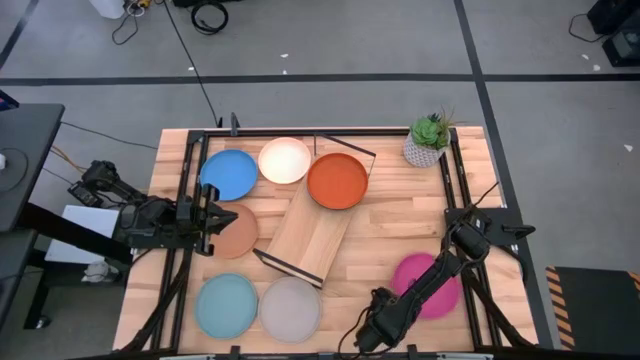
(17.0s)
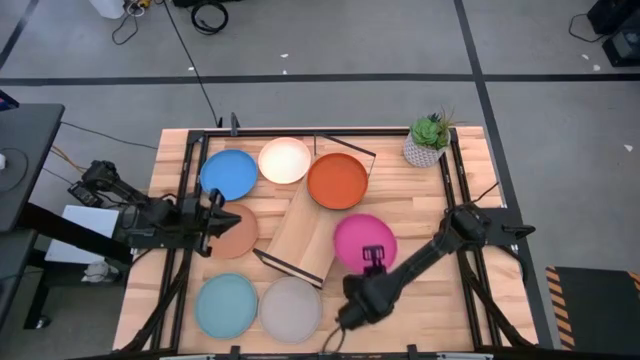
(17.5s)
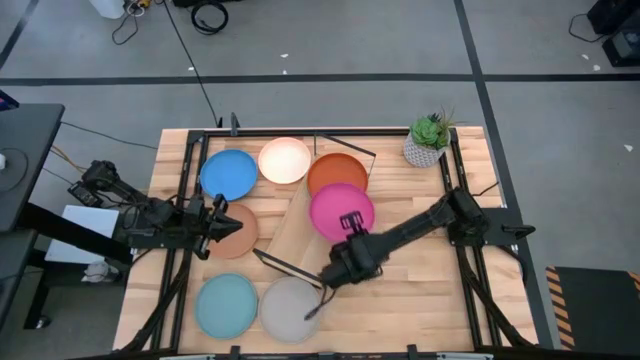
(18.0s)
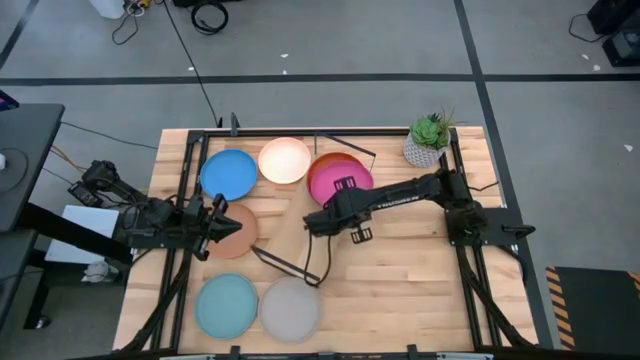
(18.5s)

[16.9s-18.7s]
Task: Place and stack plates onto a shelf
Stack the pink plate on top of the orange plate on the shelf

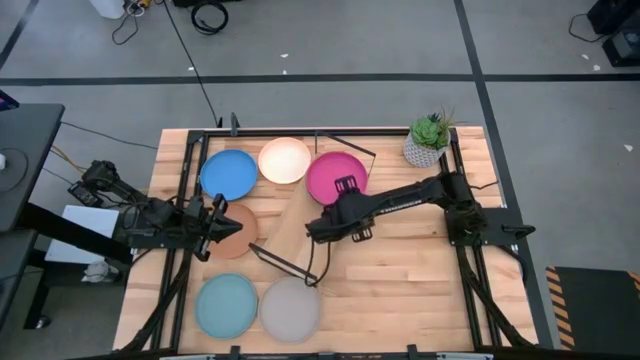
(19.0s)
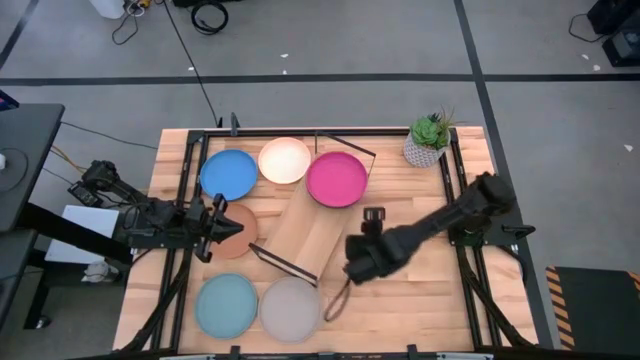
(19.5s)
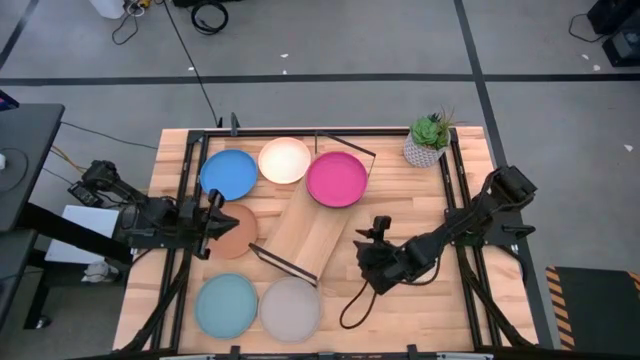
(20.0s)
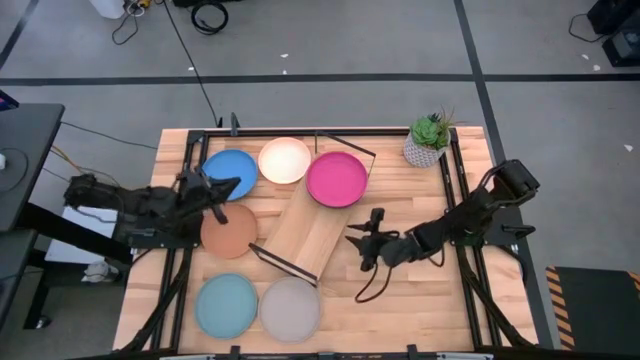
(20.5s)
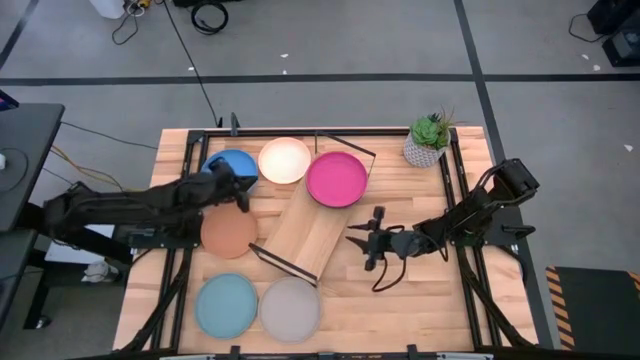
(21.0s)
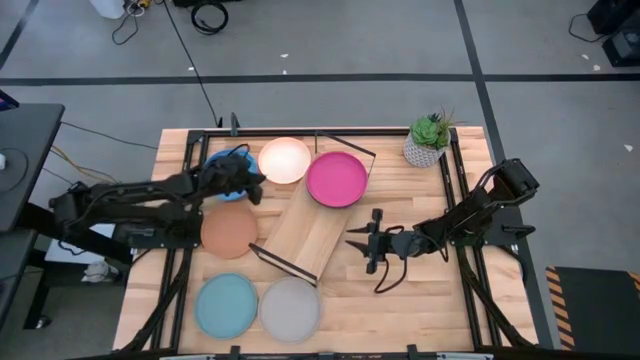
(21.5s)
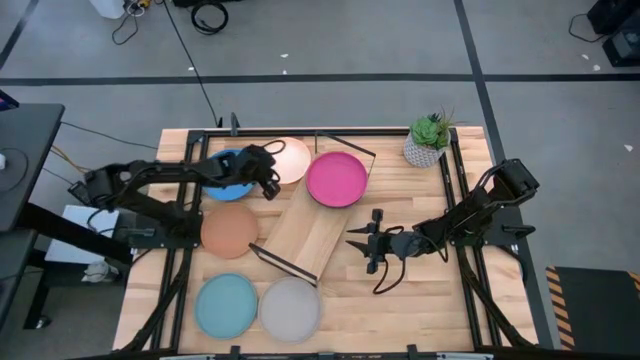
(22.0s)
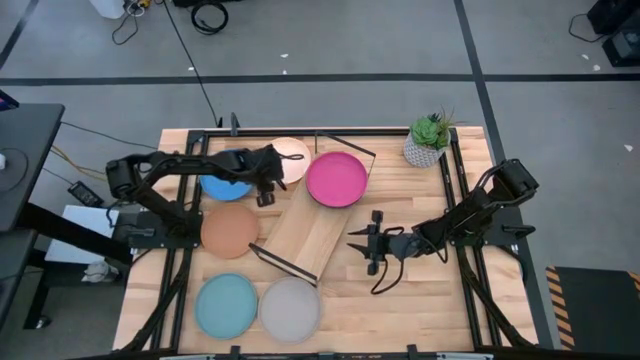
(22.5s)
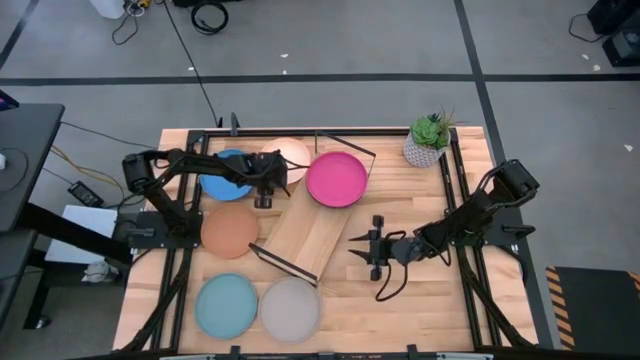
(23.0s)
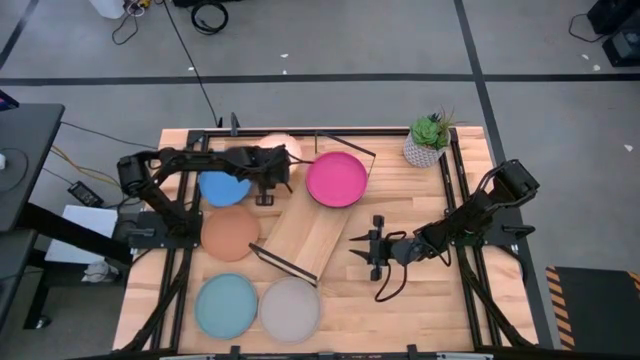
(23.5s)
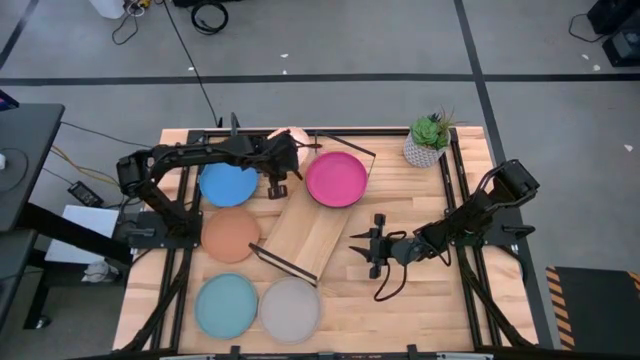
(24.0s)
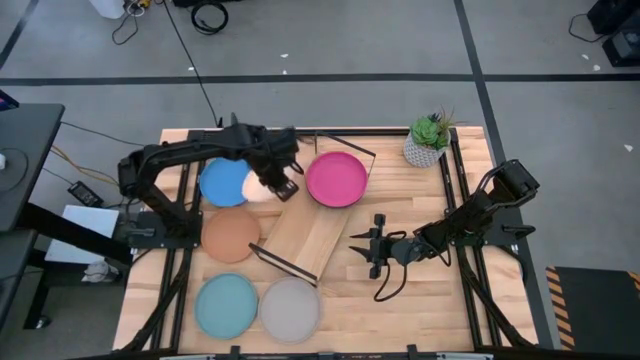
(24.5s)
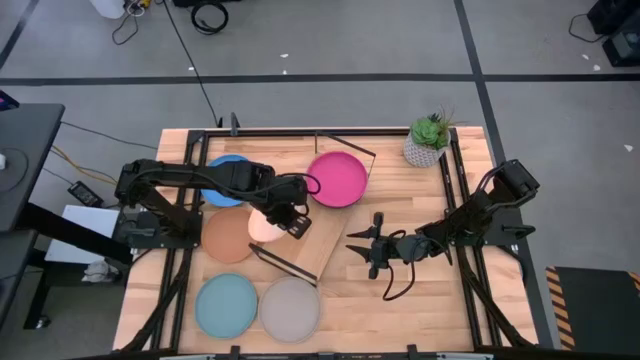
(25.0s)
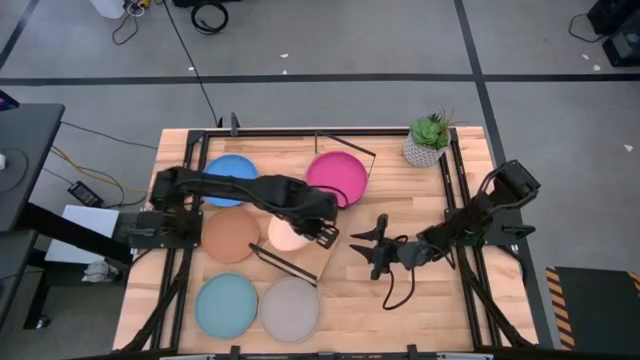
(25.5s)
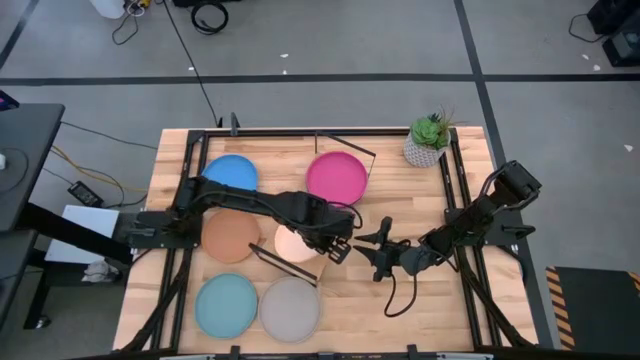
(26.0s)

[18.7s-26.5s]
Put the white plate on the shelf

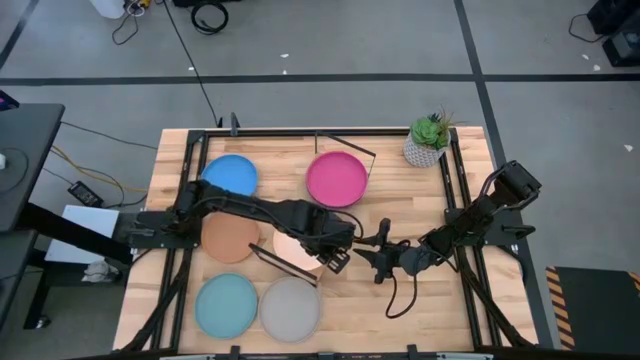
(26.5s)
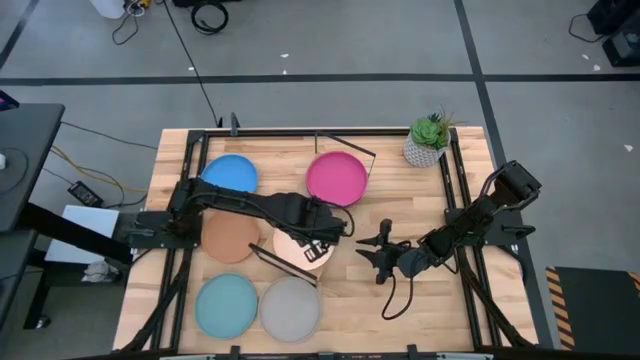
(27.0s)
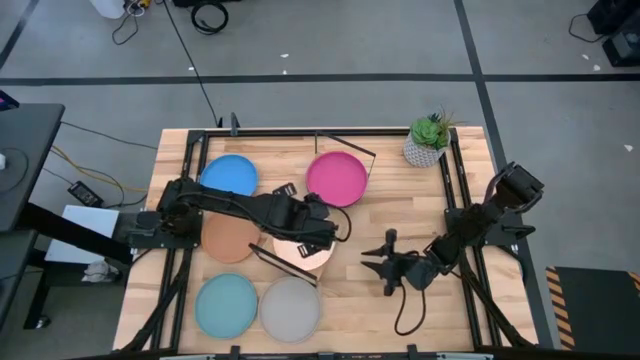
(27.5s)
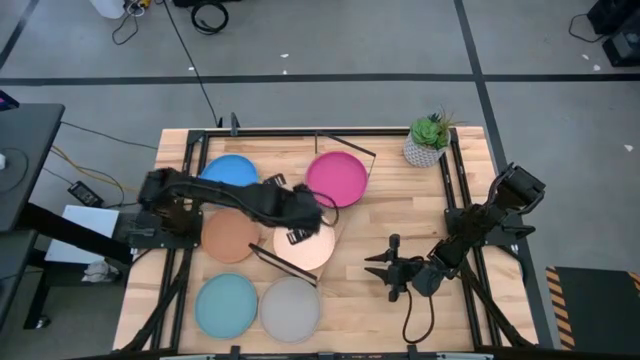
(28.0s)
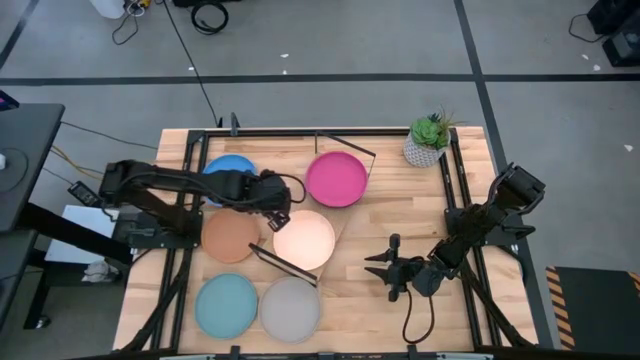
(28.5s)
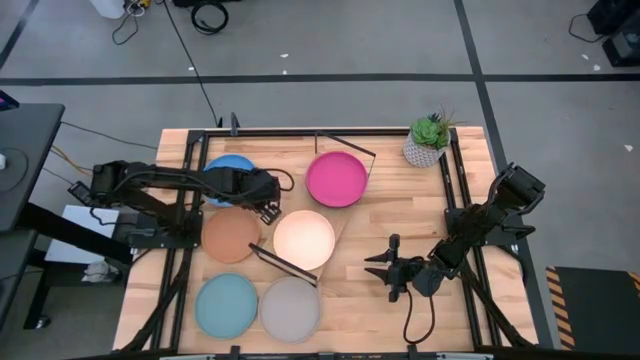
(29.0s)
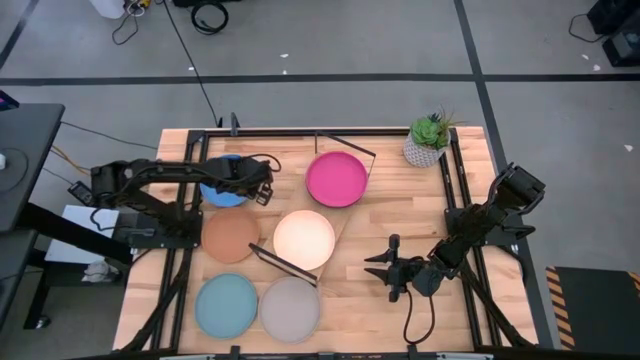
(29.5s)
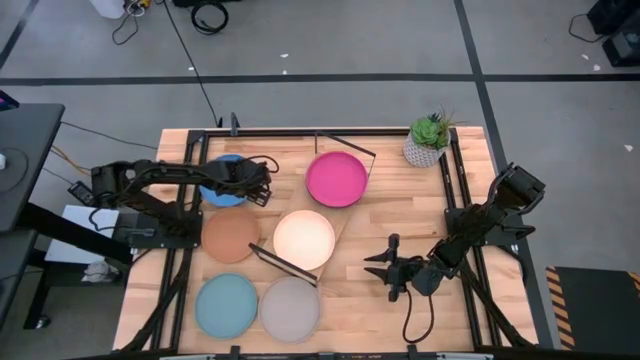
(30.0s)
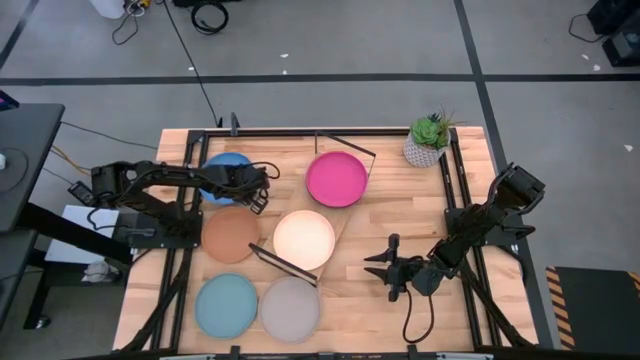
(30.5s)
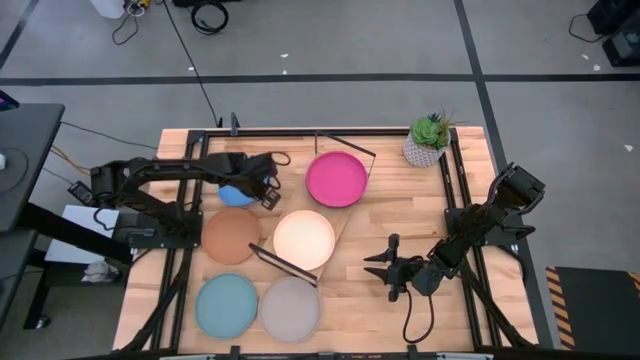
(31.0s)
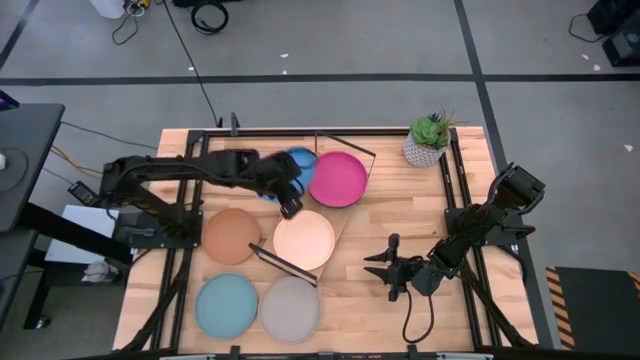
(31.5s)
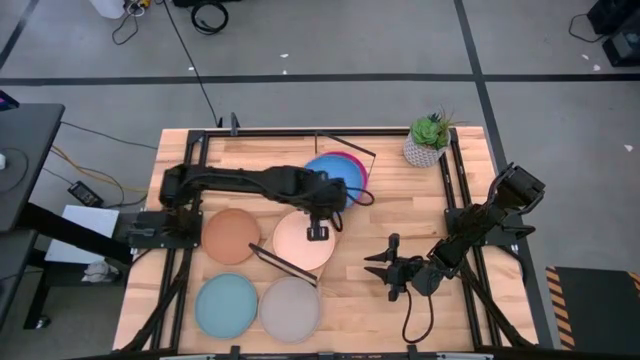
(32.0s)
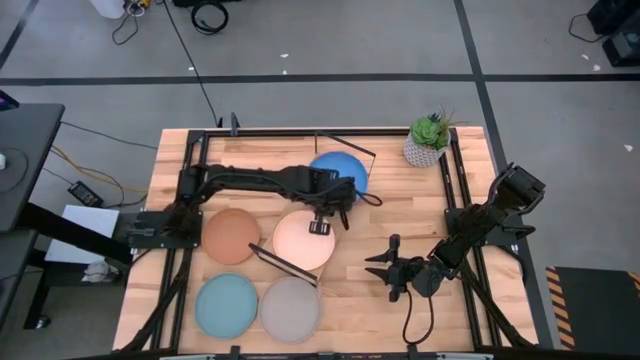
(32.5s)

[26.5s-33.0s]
Stack the blue plate on top of the pink plate on the shelf

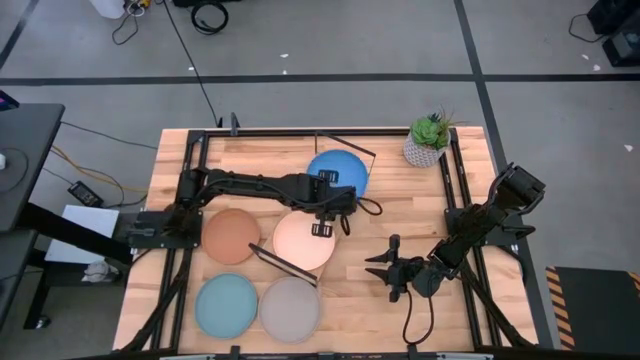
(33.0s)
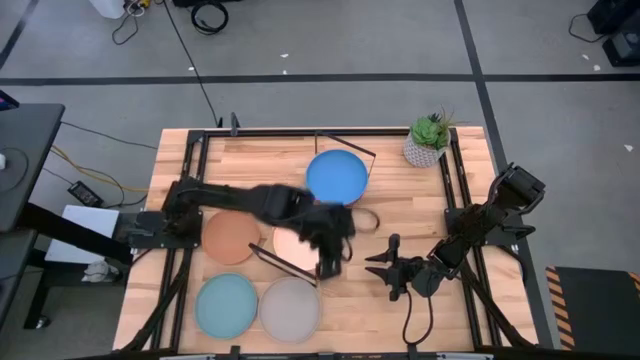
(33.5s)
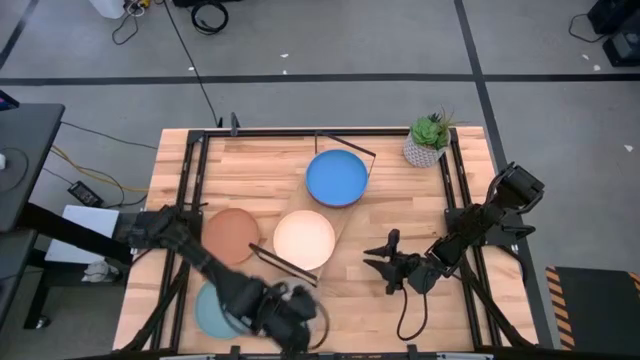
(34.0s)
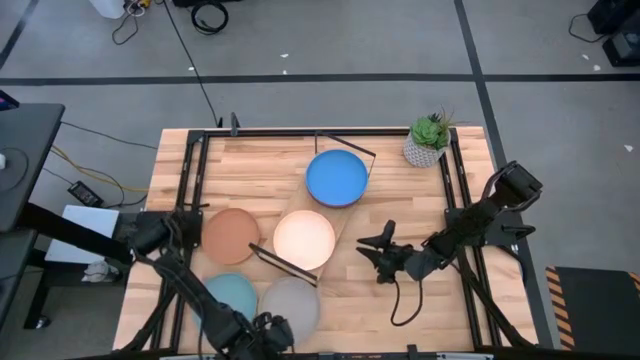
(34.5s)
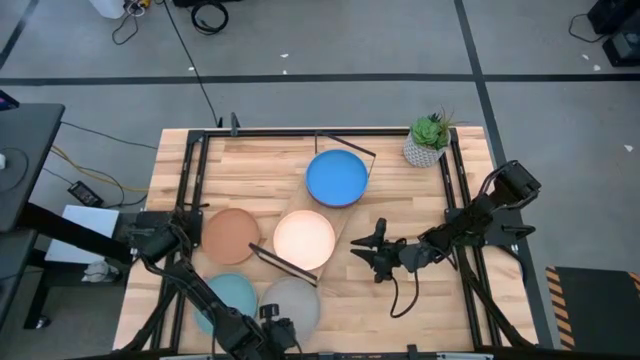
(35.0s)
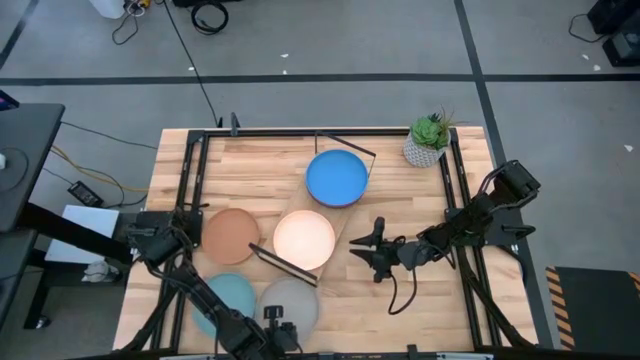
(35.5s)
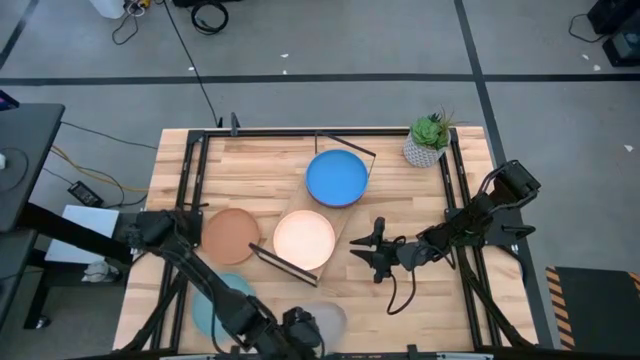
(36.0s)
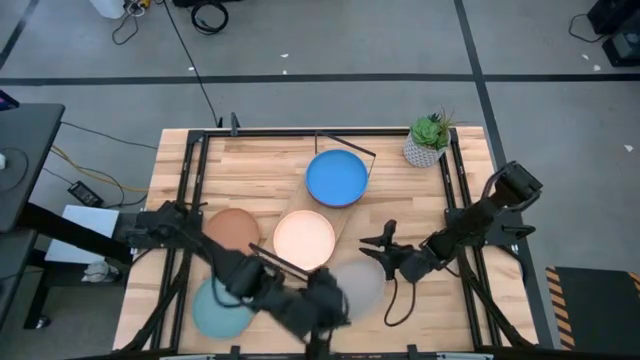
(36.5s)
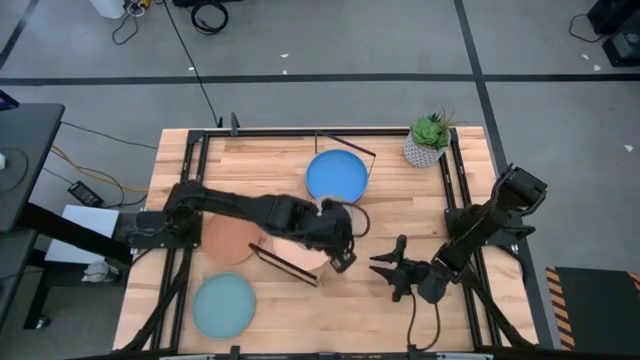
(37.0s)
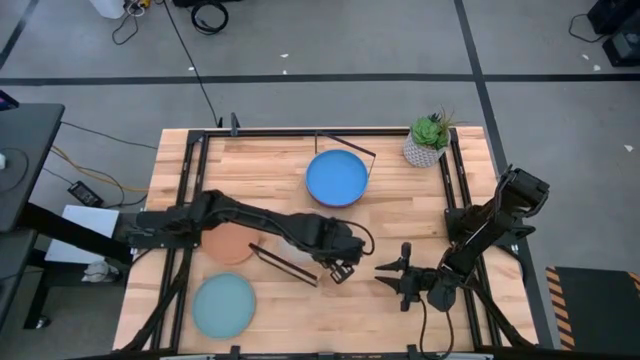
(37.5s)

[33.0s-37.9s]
Stack the gray plate on top of the light orange plate on the shelf
